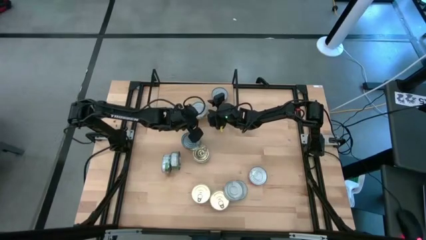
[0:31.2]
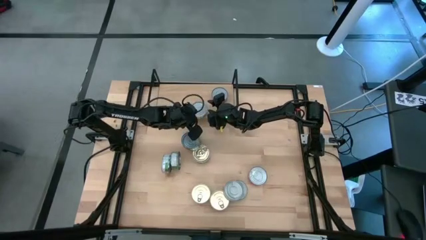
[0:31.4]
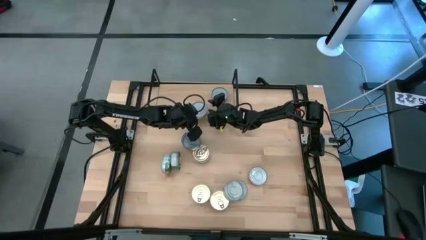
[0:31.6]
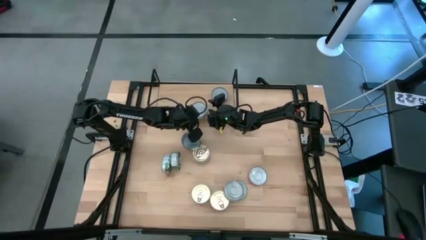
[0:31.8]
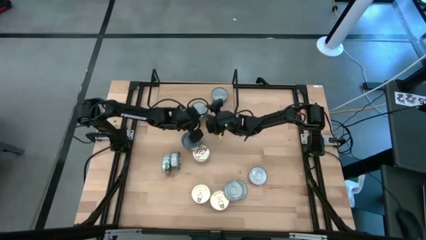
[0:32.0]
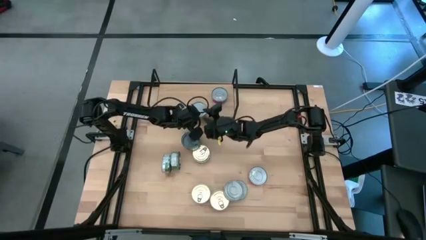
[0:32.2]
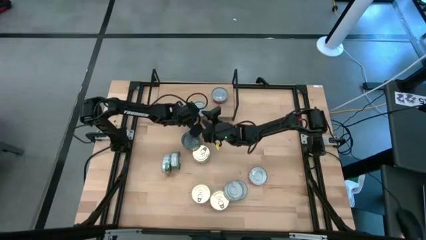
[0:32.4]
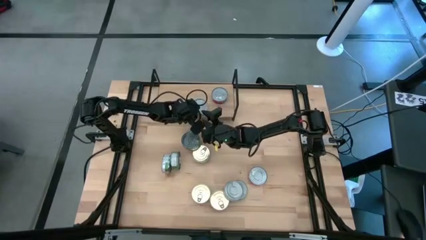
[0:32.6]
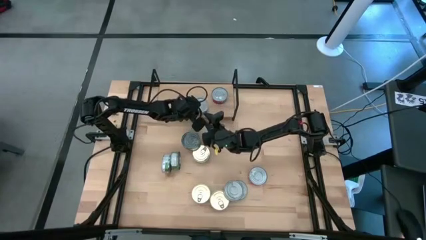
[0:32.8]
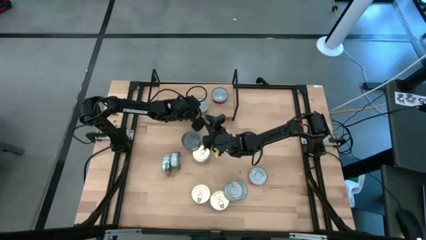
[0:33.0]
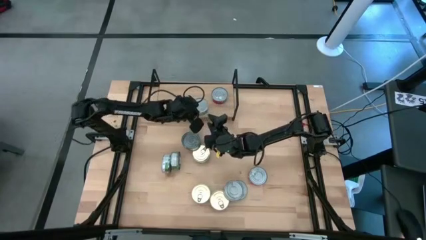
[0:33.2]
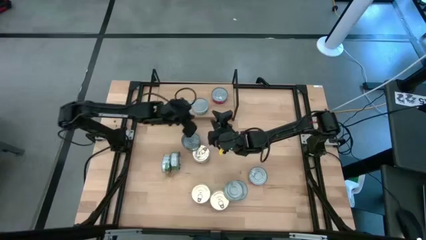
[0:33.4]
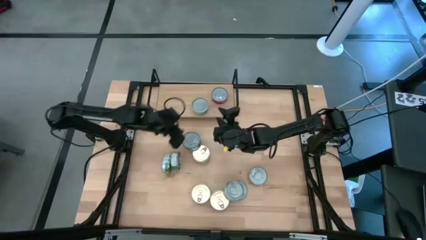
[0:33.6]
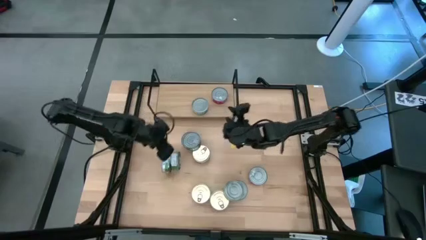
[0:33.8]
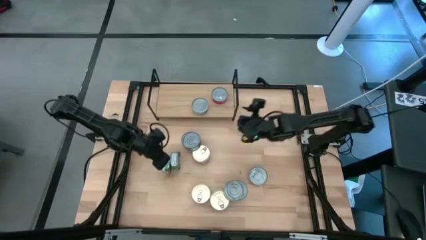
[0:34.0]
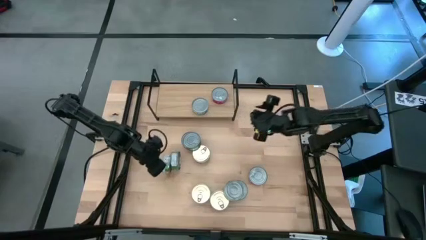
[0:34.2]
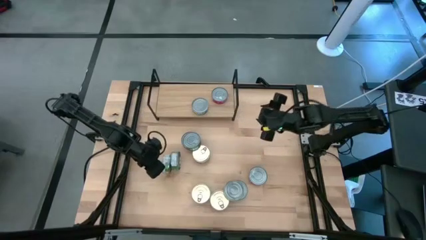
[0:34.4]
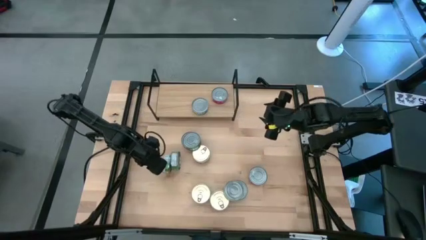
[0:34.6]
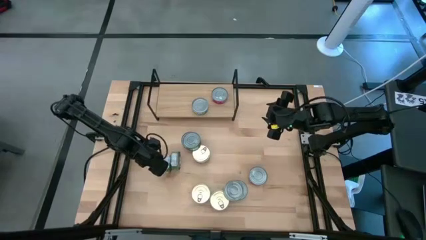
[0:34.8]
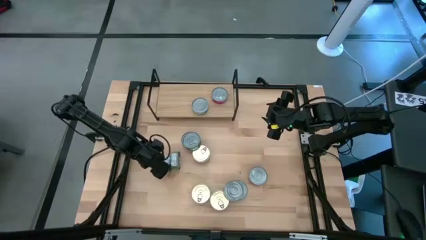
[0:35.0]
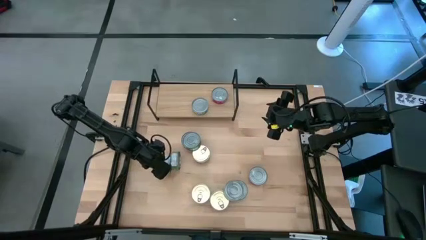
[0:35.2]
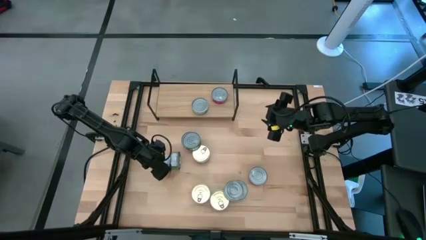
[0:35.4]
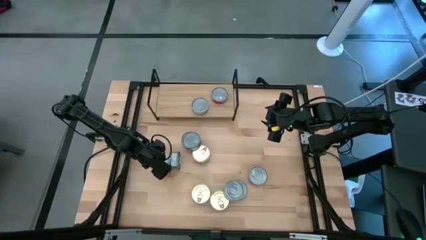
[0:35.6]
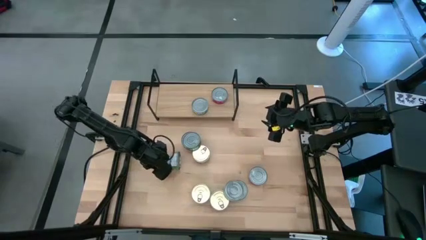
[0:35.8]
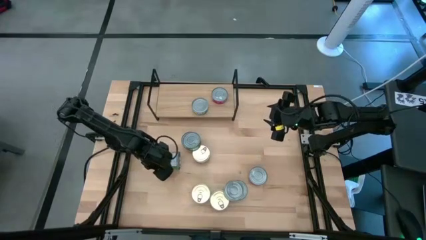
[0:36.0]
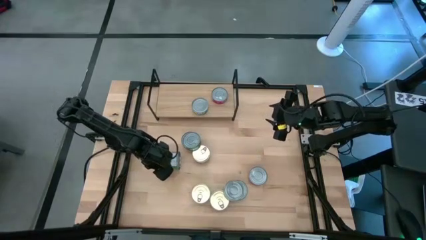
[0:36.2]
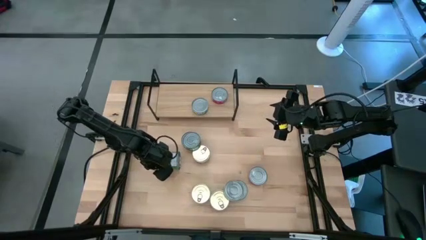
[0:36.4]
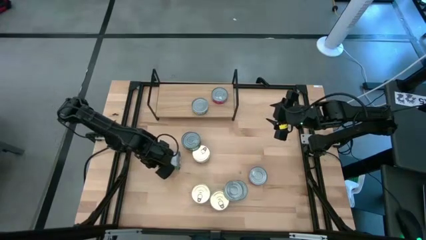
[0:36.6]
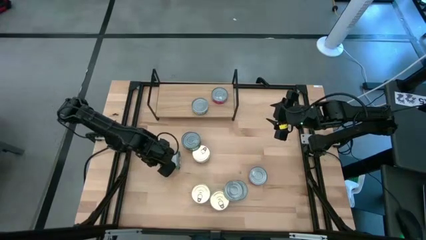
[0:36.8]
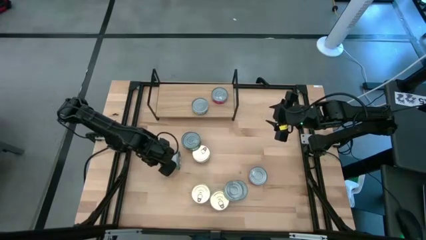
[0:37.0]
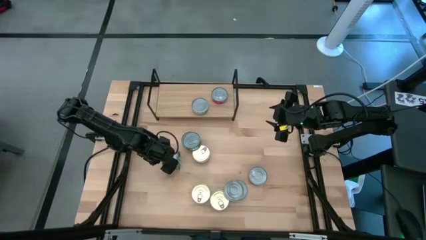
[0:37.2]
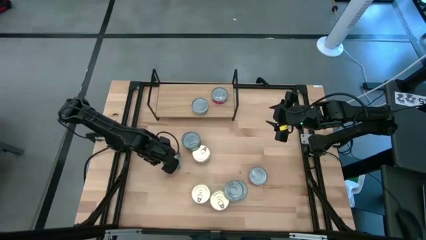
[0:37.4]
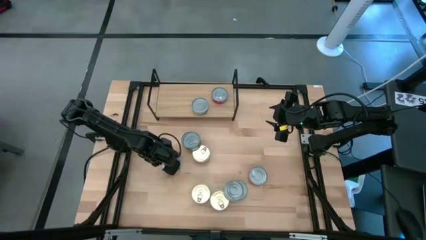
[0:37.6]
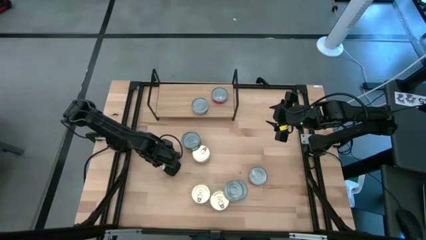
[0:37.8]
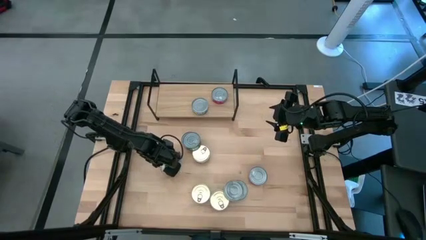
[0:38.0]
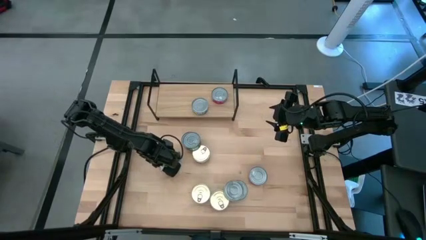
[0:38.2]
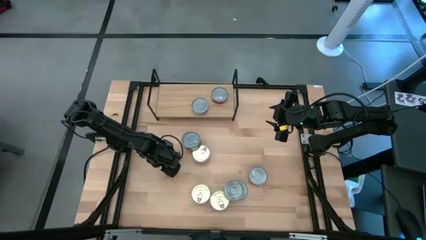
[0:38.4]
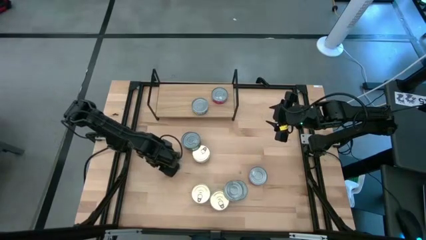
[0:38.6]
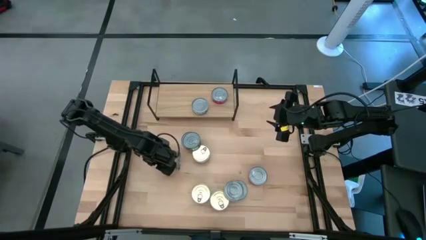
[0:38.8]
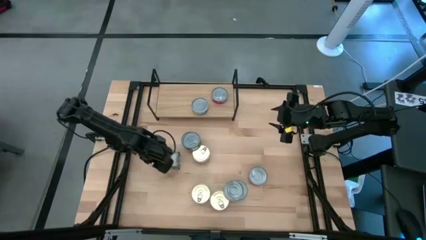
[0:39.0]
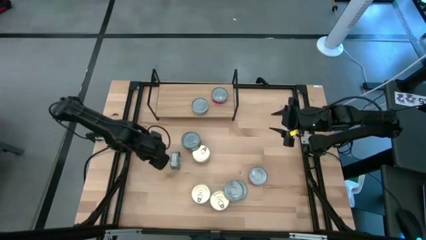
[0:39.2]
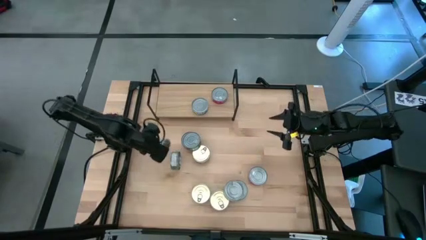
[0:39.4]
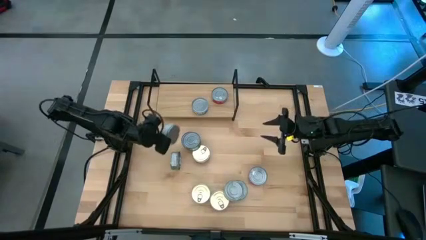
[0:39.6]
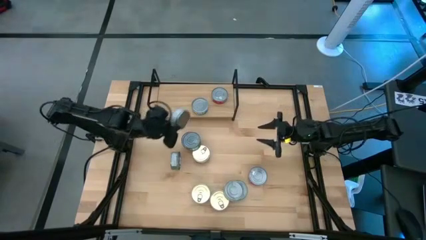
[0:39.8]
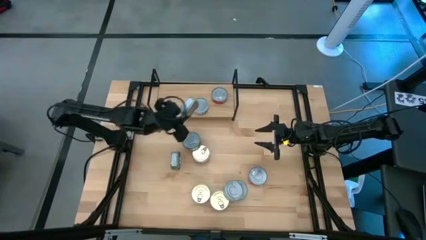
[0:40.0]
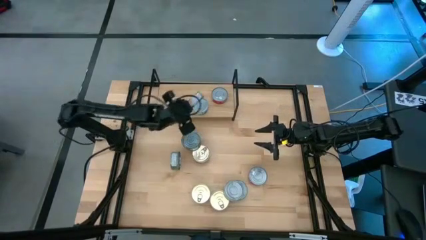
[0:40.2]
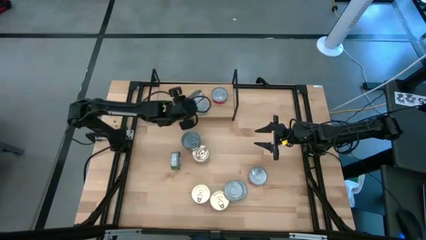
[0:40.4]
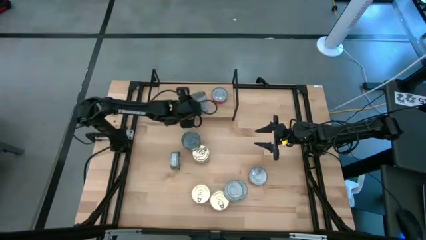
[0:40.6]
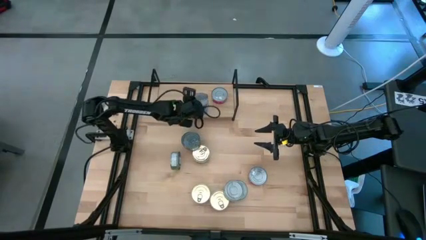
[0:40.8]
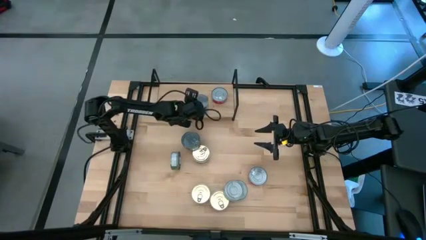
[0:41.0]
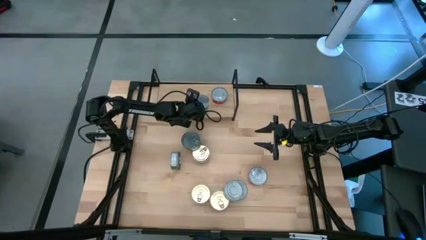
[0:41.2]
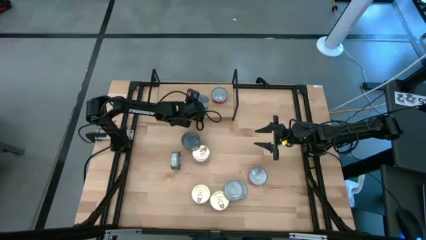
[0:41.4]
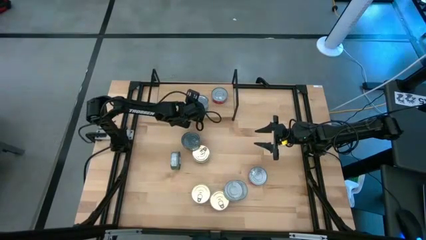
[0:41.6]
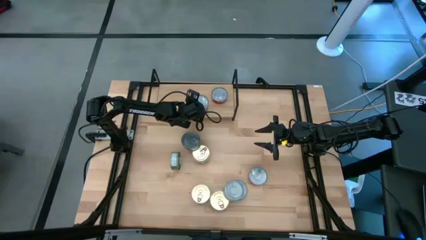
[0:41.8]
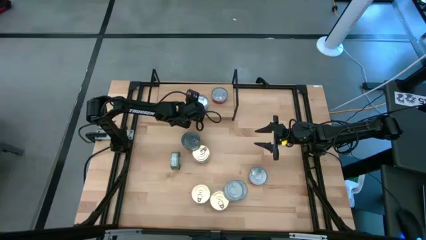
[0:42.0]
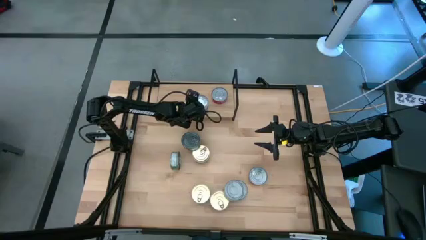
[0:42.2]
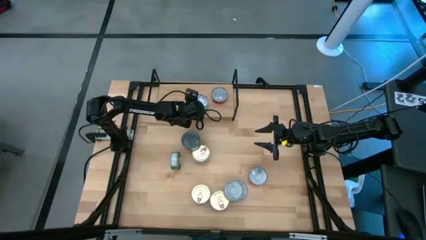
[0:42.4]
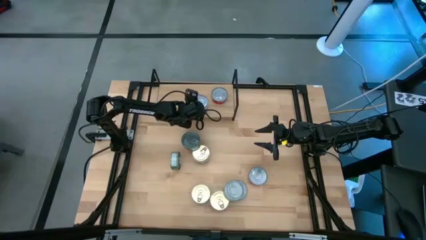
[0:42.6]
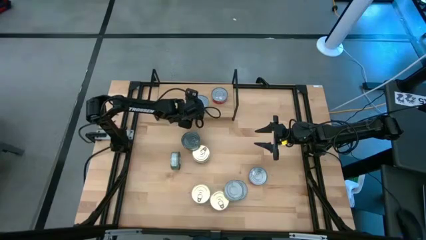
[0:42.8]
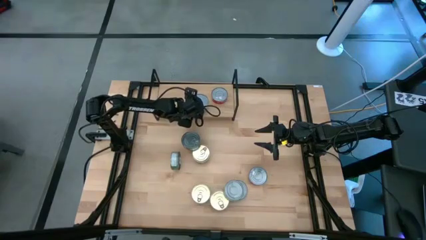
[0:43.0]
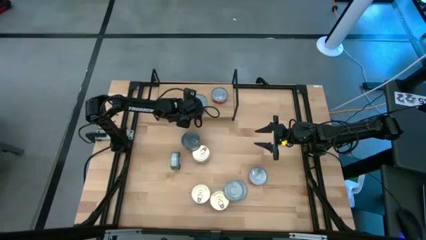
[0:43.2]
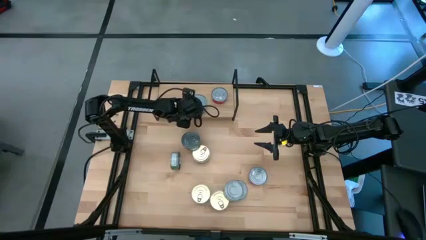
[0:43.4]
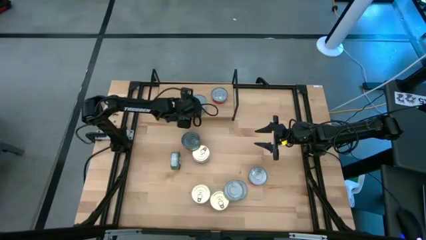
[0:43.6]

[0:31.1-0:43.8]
Task: Stack canned seafood by type on shelf
Stack the green white tuna can on top of the other green white tuna can on the shelf
